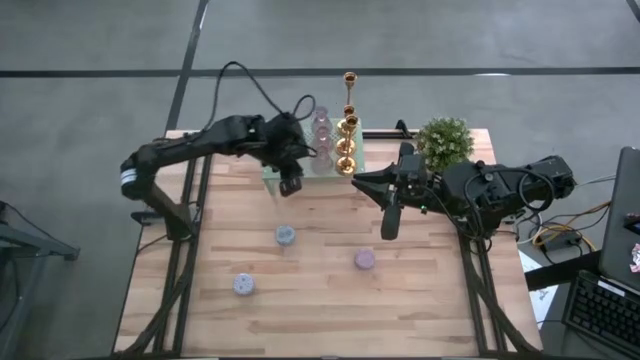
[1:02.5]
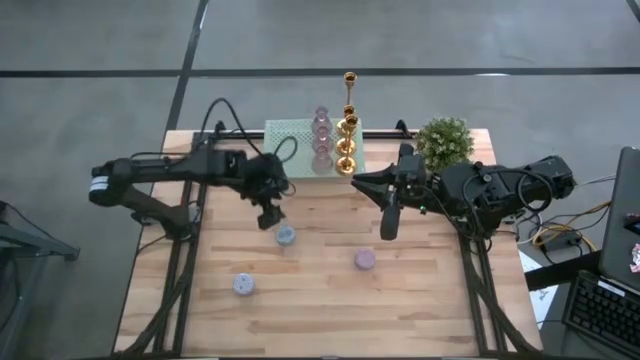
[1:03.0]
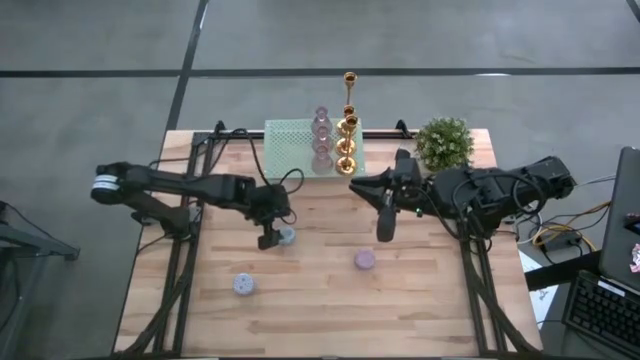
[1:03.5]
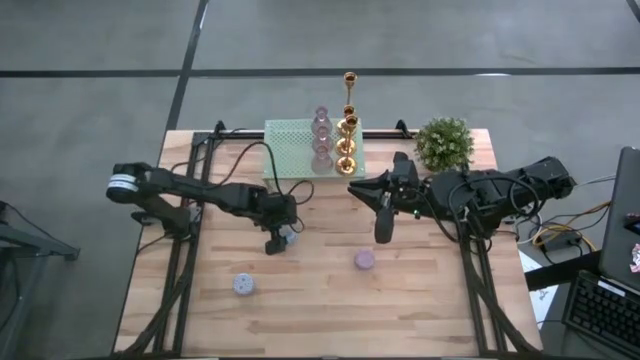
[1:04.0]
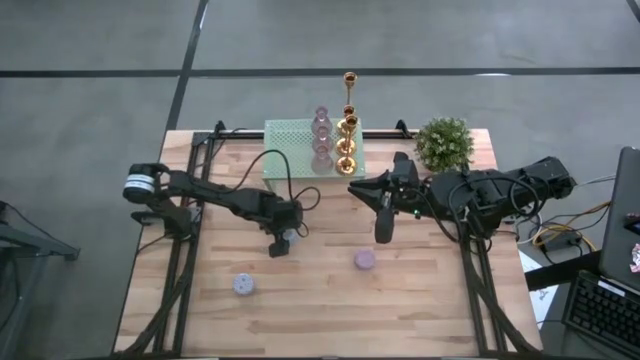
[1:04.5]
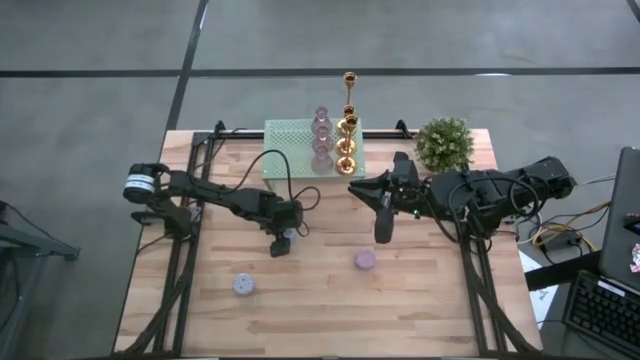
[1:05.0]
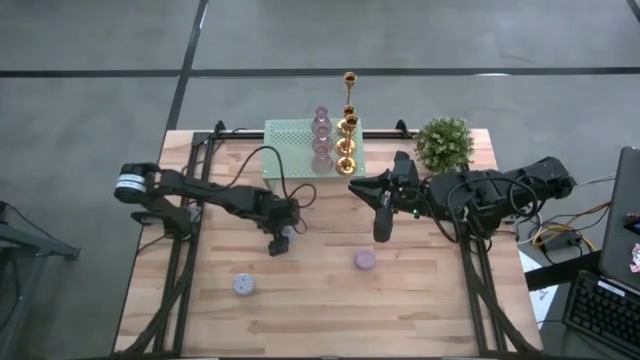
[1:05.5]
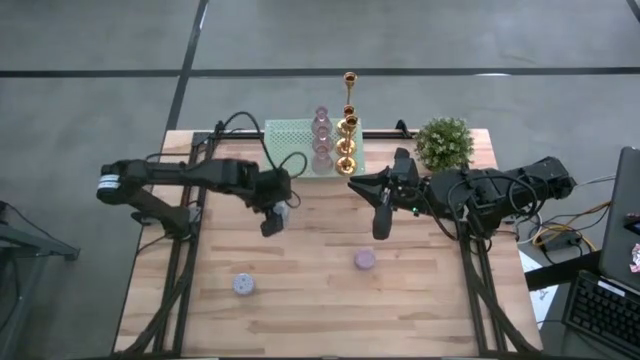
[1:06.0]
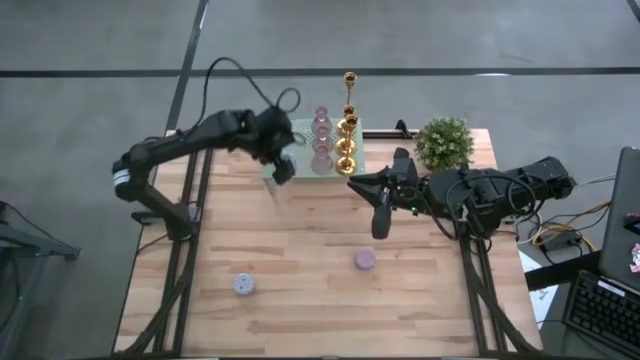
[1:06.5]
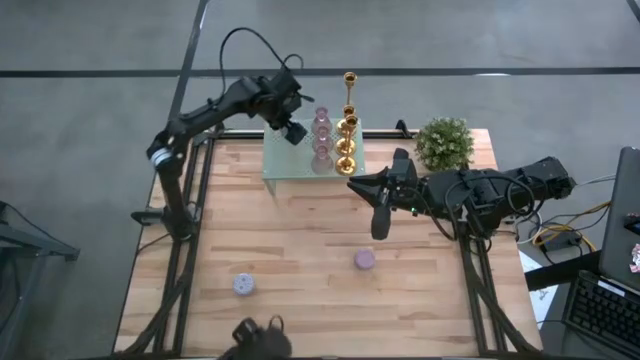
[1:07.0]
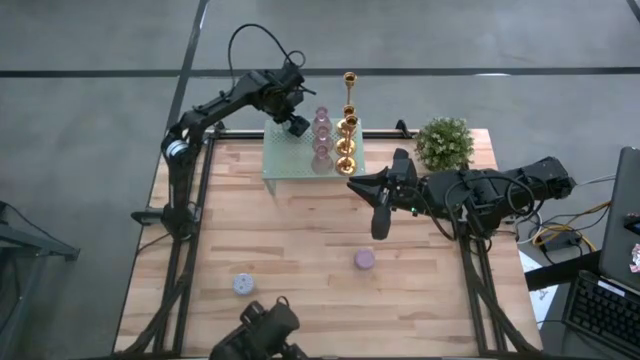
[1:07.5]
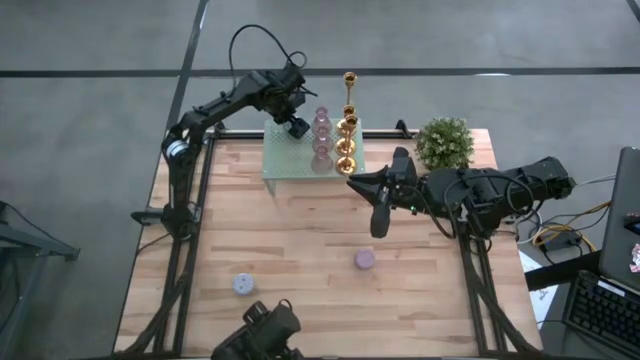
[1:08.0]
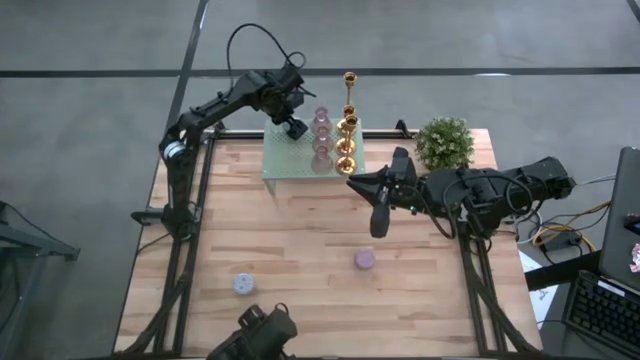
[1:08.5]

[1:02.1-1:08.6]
Task: Pick & Place candle stick holders
Put the blue patterned scented candle on the shelf

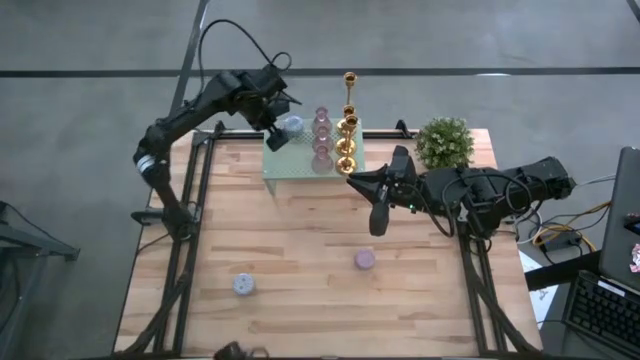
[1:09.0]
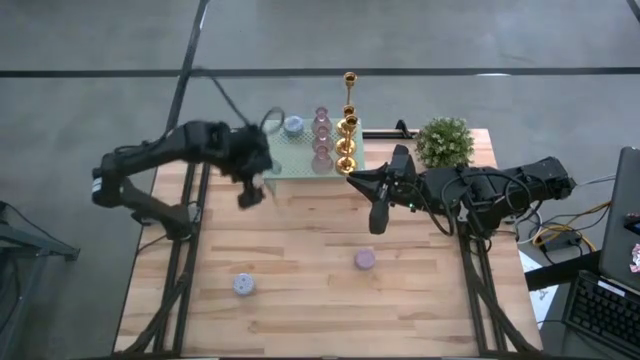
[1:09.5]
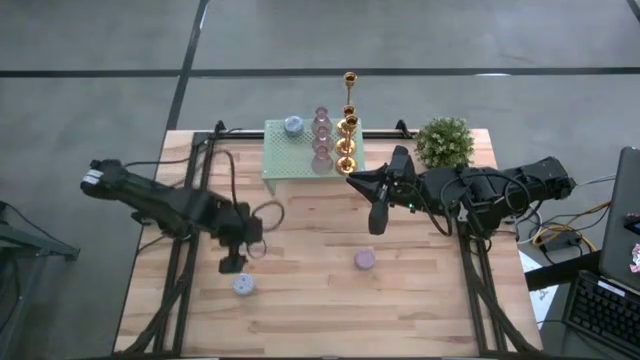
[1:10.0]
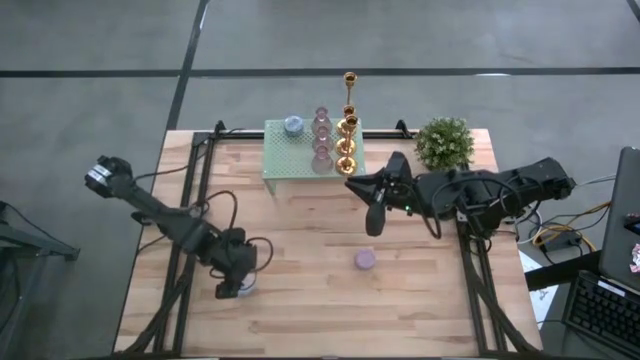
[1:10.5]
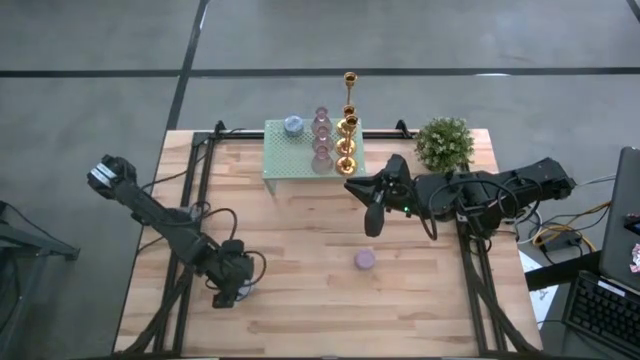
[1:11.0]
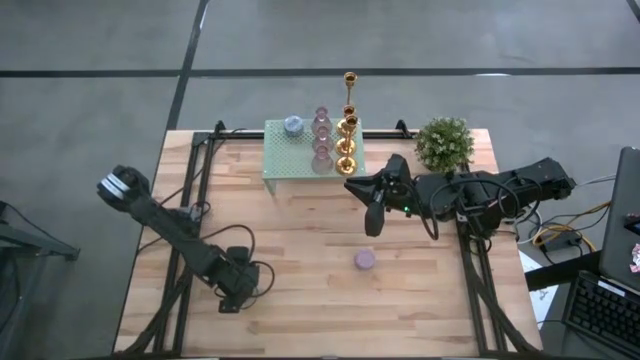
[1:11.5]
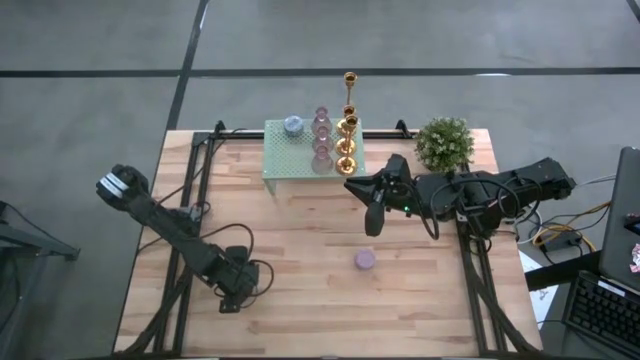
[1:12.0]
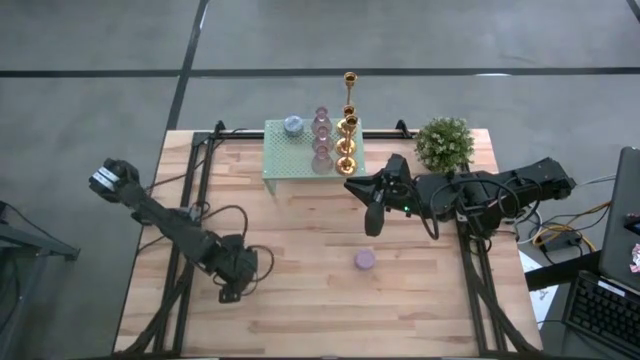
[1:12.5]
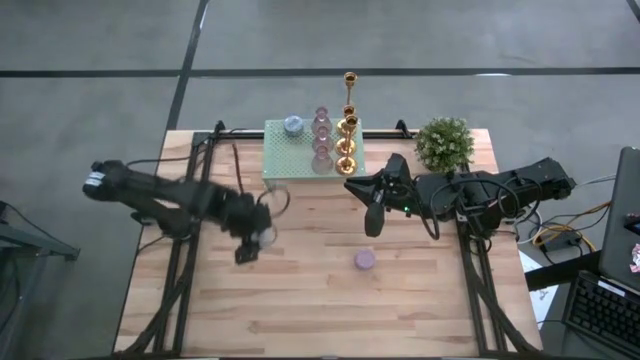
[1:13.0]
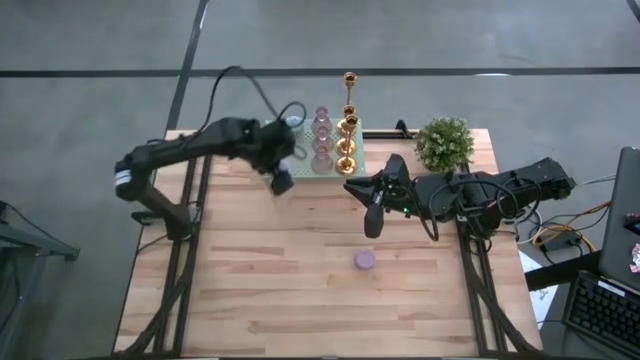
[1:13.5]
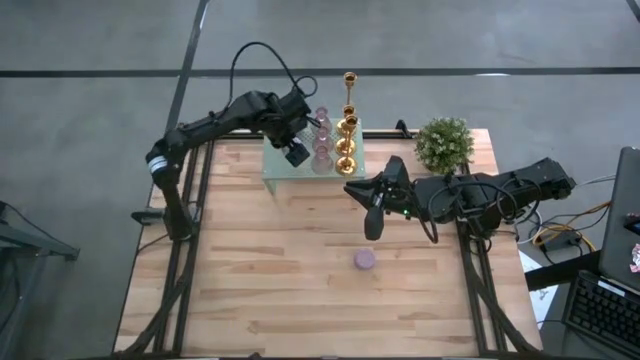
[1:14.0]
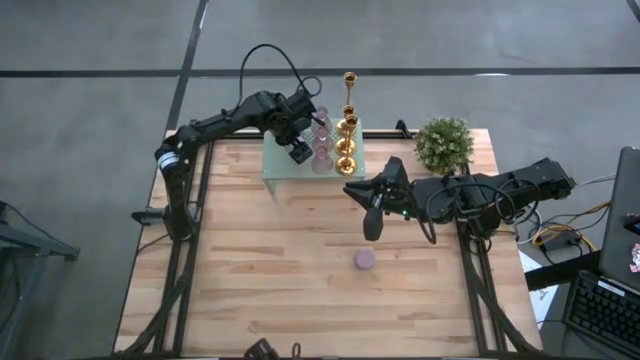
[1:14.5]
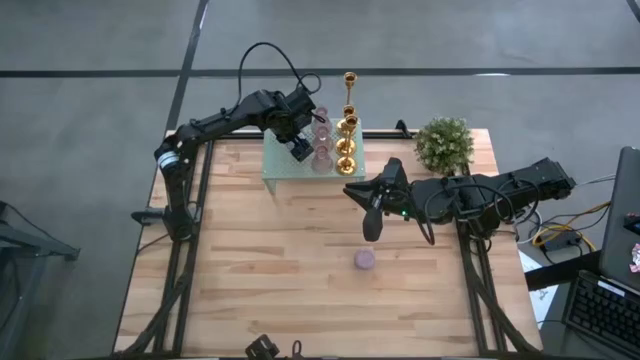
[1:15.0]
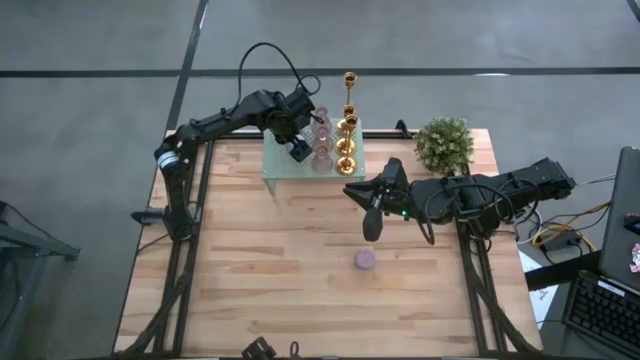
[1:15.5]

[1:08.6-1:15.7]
Put the red scented candle aligned with the other blue scented candle on the shelf

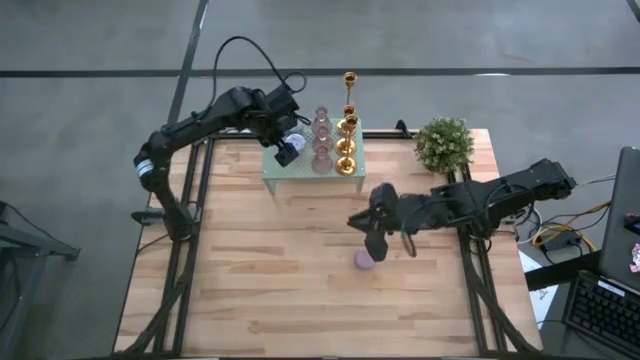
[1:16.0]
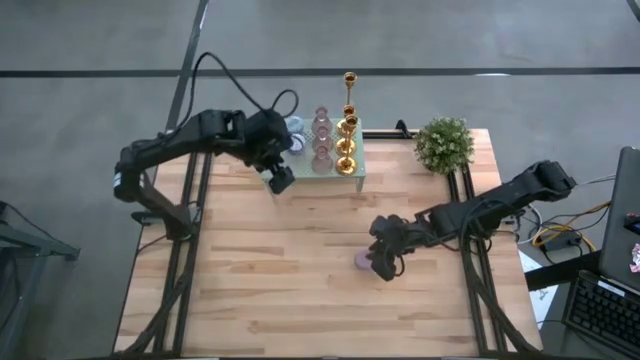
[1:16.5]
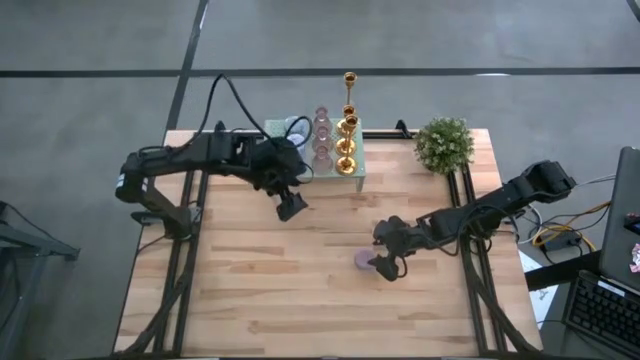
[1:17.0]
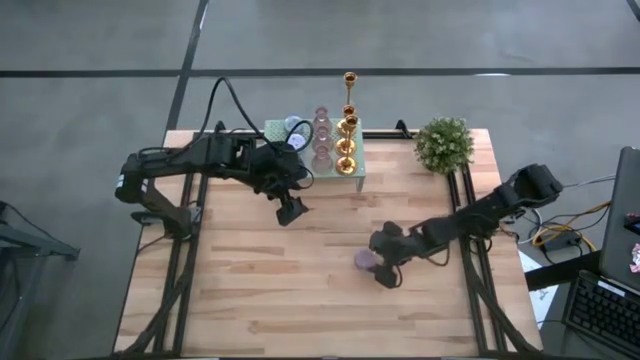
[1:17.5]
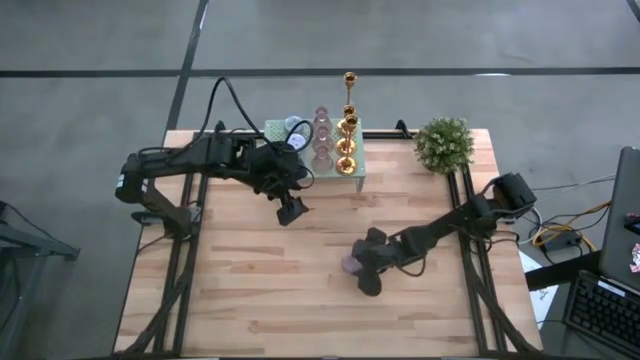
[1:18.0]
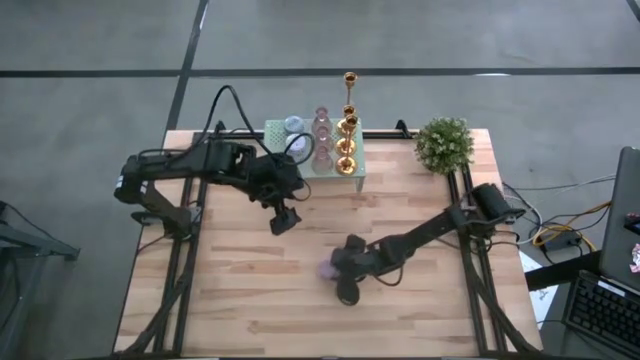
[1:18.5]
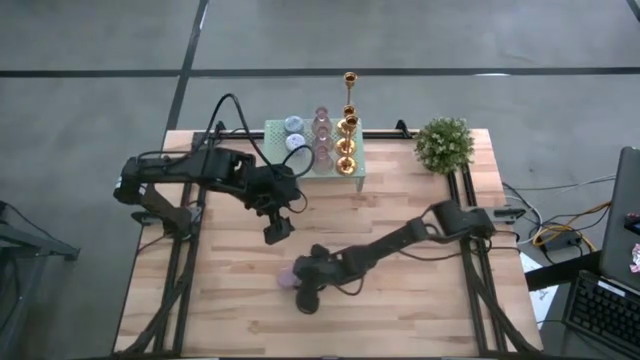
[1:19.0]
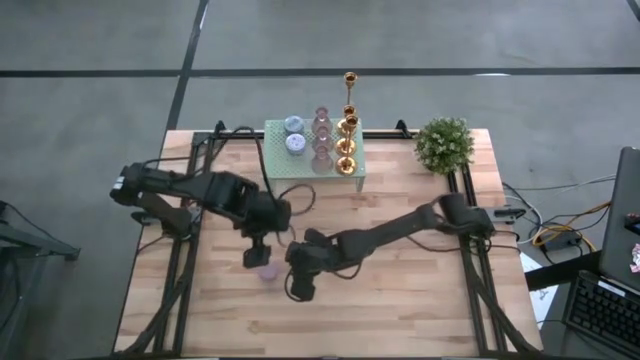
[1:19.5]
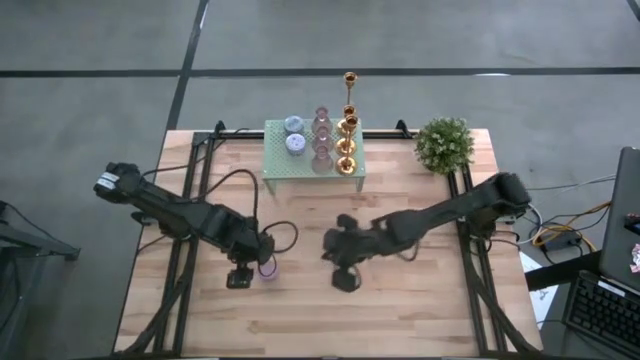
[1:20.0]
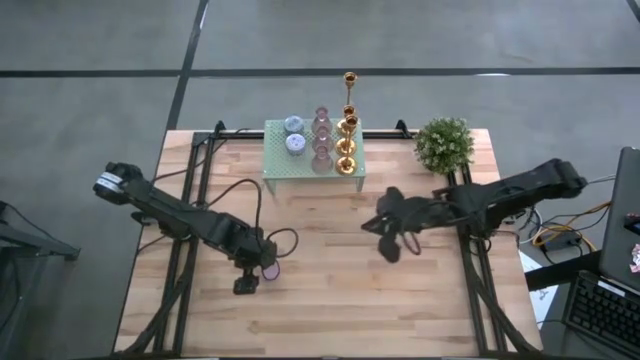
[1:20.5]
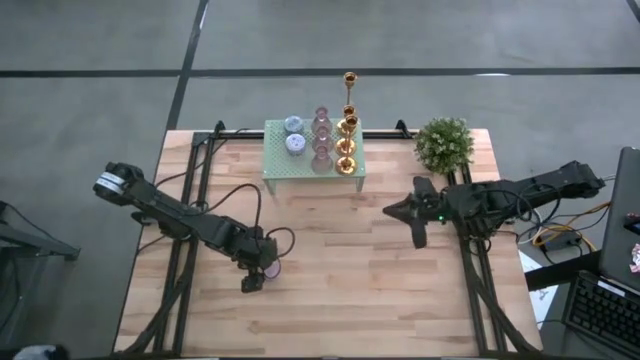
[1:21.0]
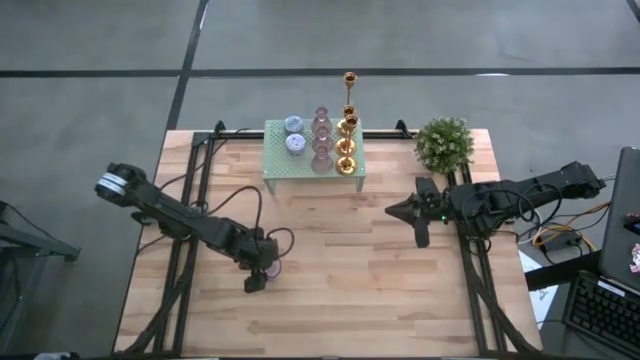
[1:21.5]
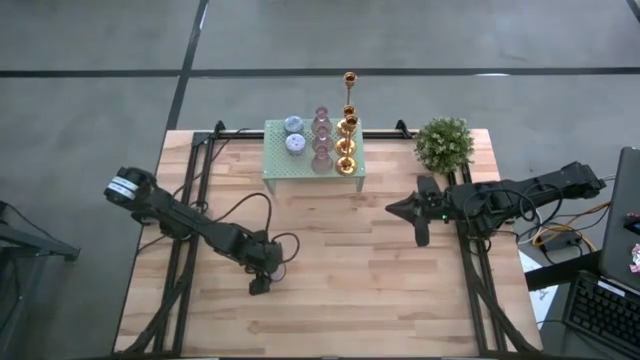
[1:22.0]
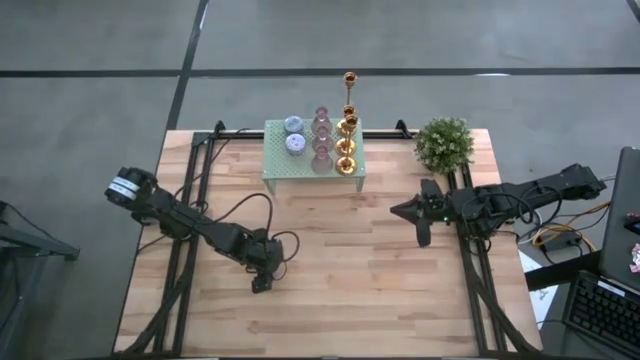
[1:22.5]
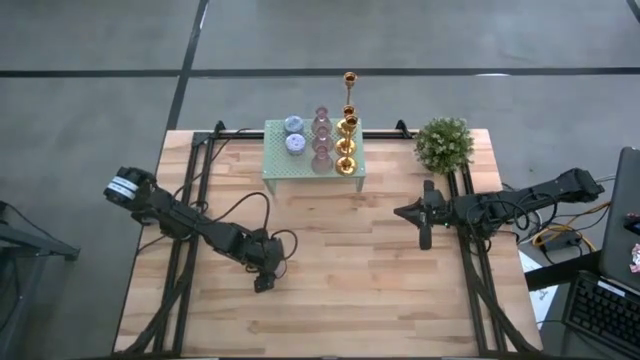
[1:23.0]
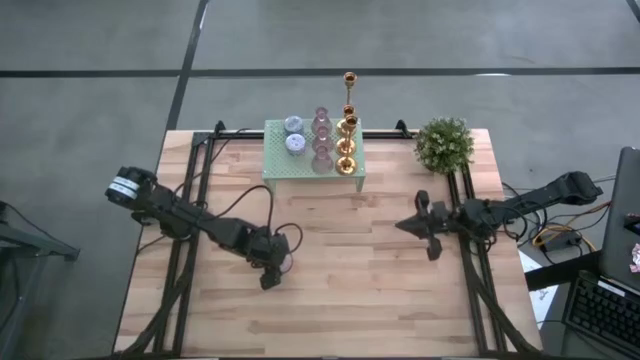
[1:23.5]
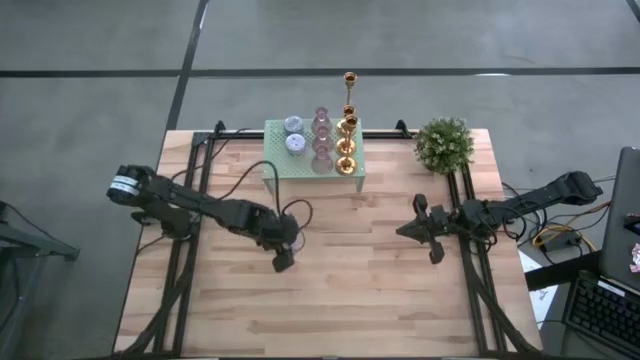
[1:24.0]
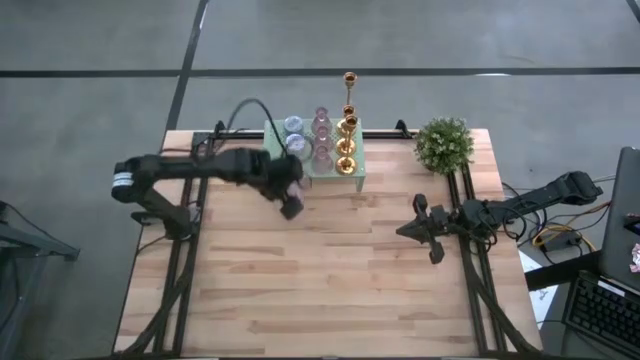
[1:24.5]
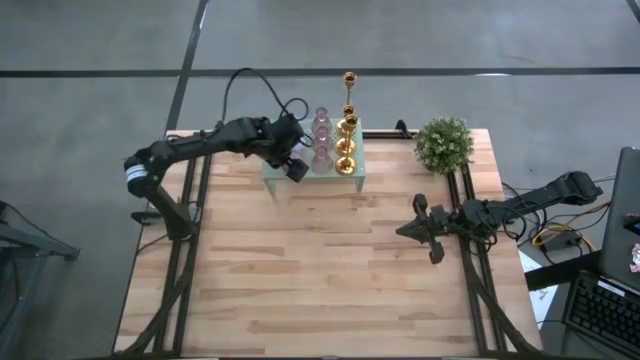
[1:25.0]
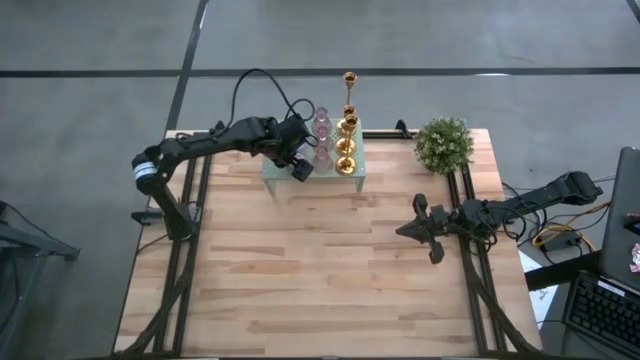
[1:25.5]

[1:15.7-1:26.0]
Put the pink patterned scented candle aligned with the other scented candle on the shelf
